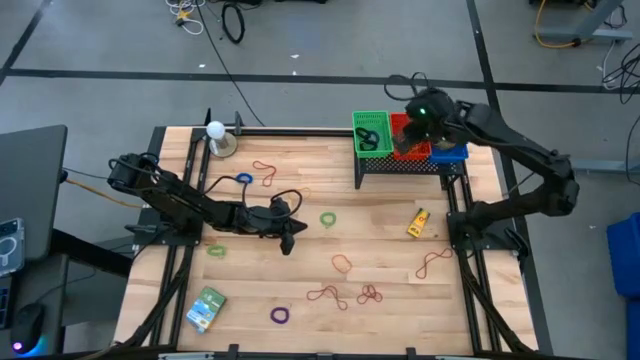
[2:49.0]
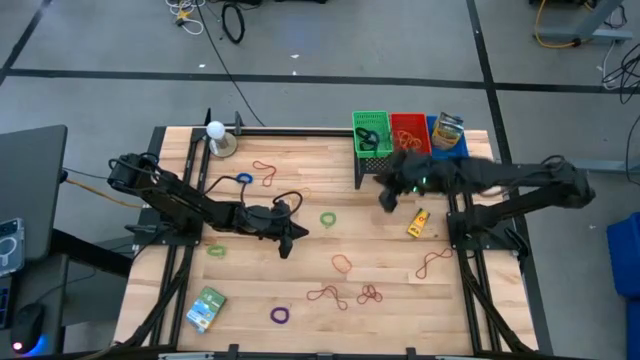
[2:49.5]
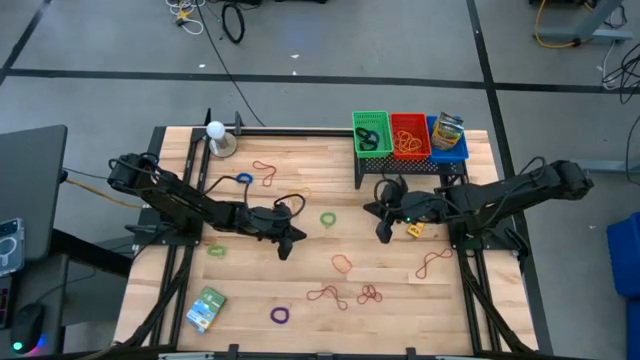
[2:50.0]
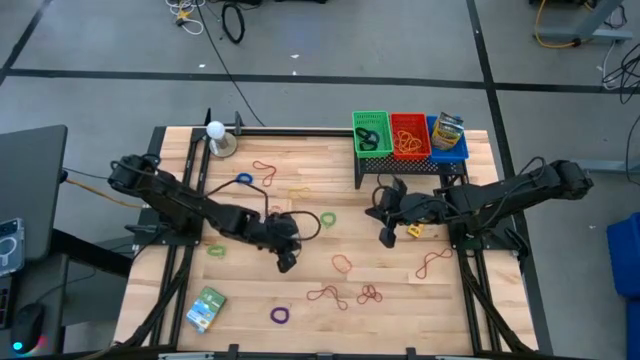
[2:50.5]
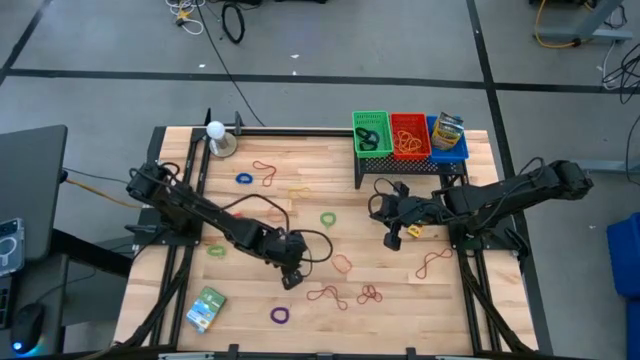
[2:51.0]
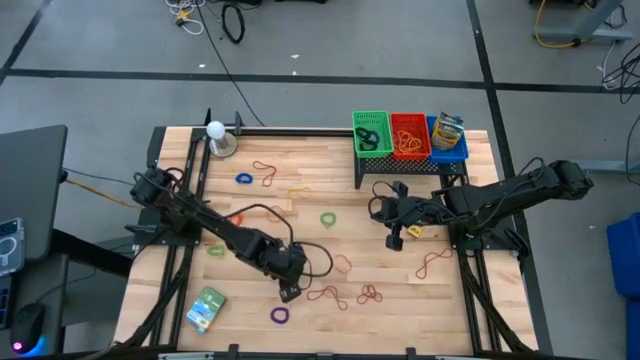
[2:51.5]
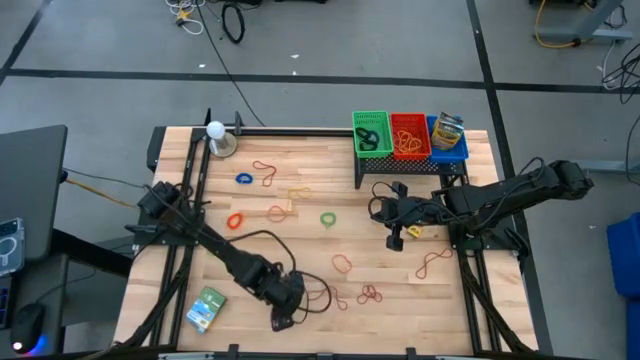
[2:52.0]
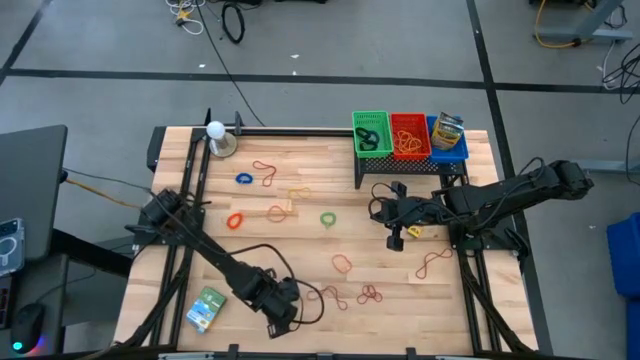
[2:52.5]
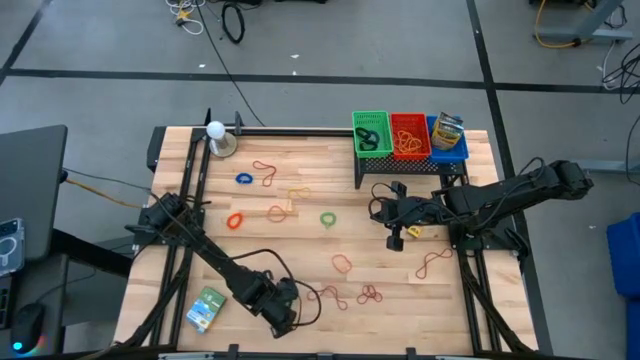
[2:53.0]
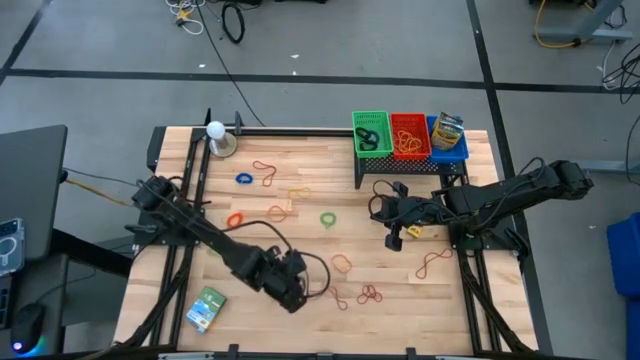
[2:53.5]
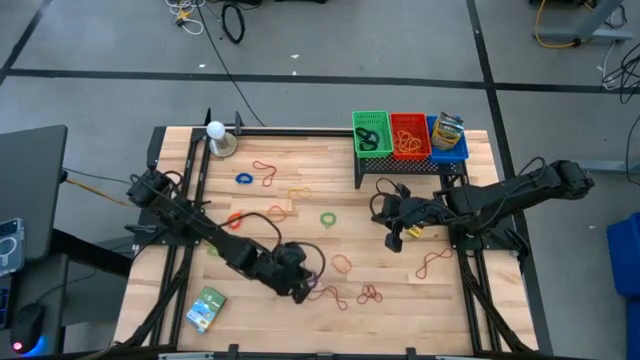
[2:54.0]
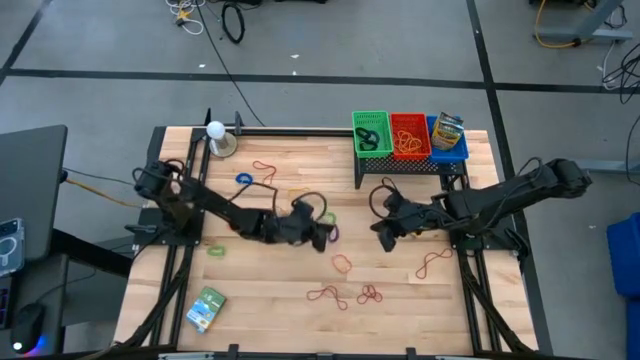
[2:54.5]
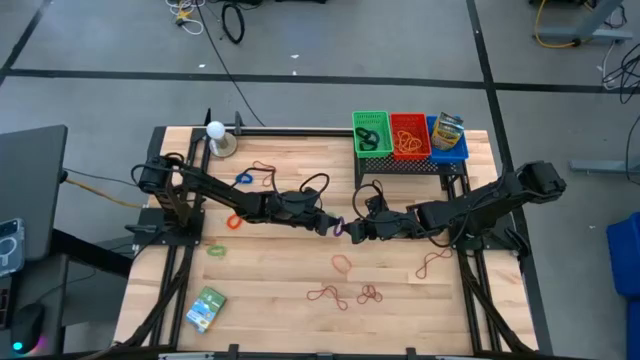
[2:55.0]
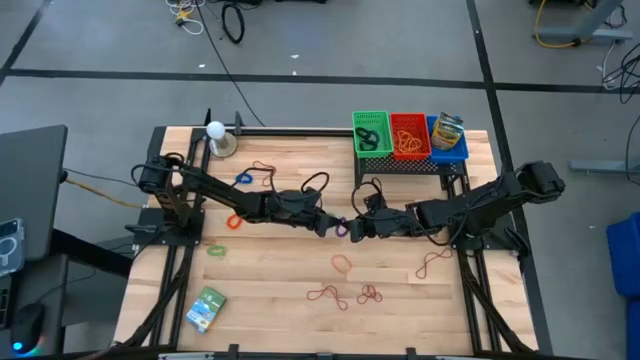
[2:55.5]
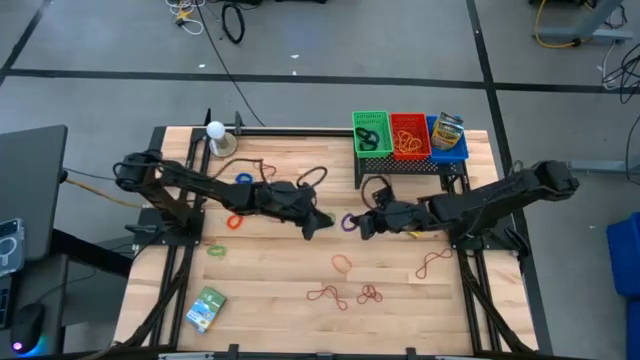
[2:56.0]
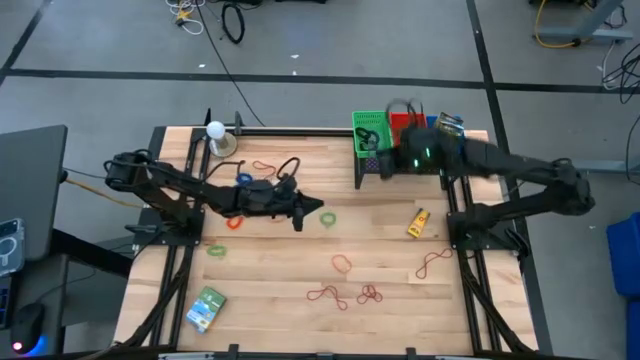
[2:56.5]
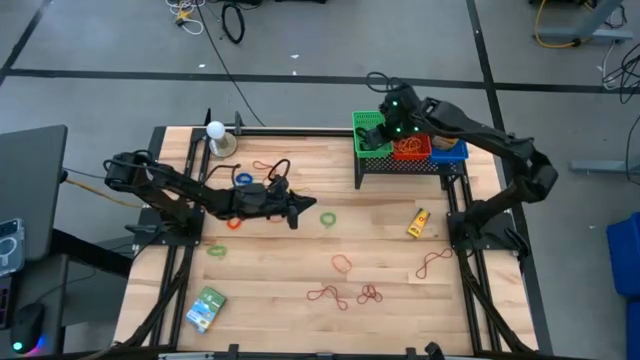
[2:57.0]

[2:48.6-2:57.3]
Task: Pick & Place Office Desk Supplies
Put the purple spring keychain into the green bin

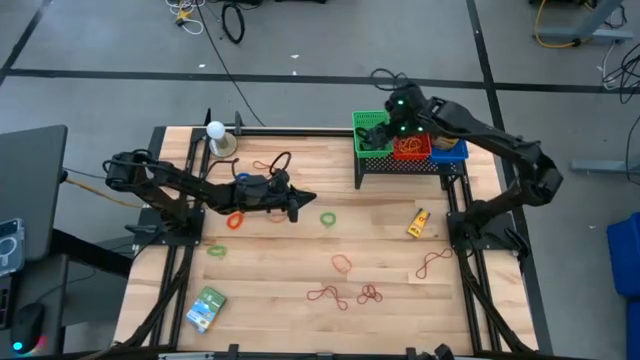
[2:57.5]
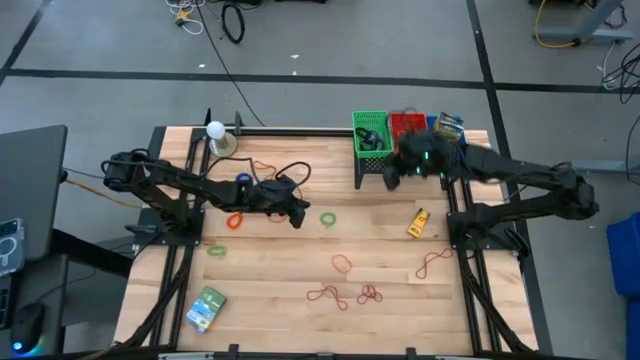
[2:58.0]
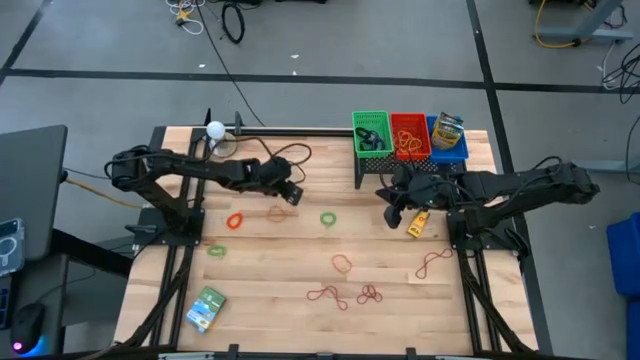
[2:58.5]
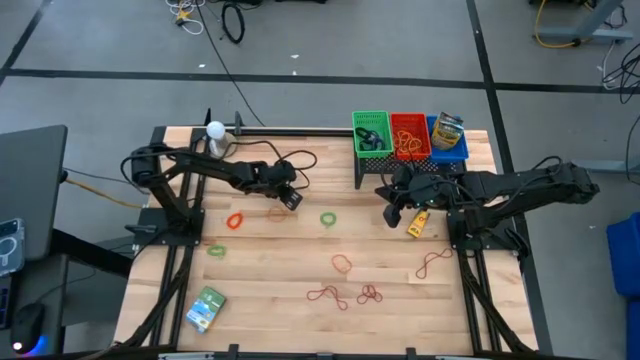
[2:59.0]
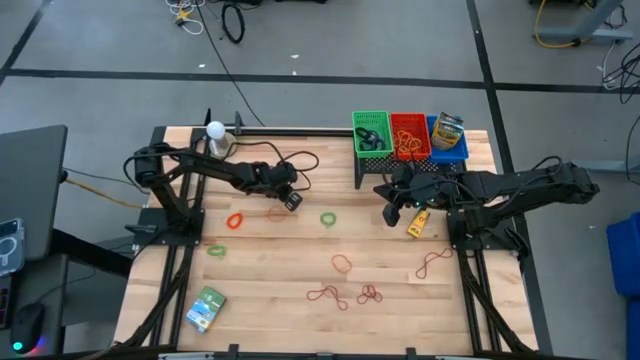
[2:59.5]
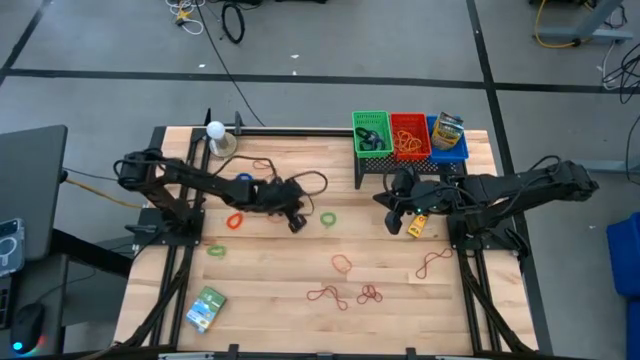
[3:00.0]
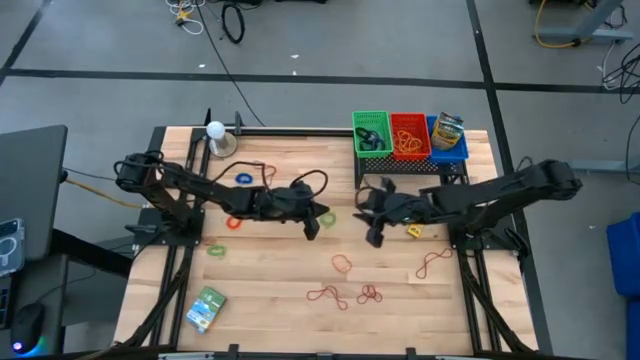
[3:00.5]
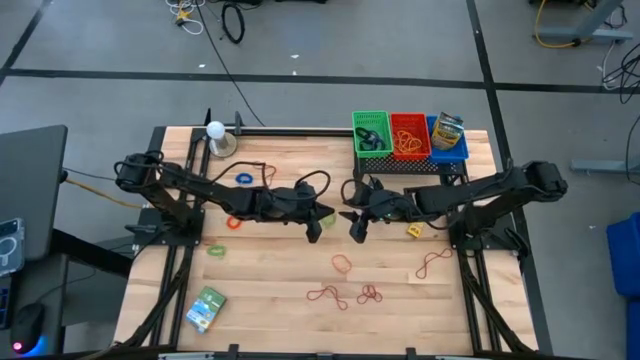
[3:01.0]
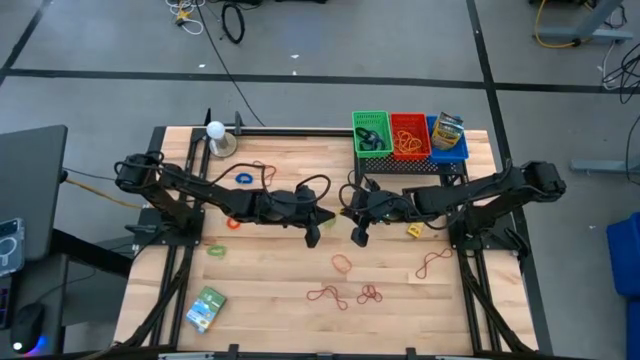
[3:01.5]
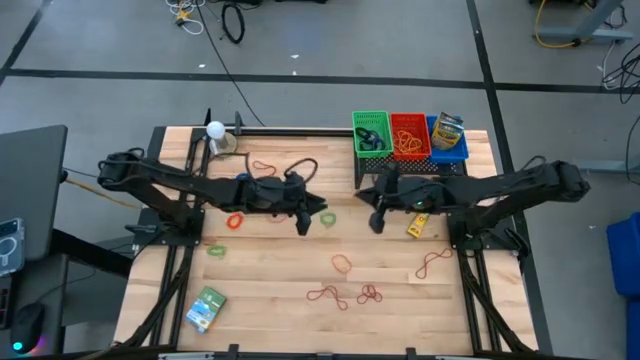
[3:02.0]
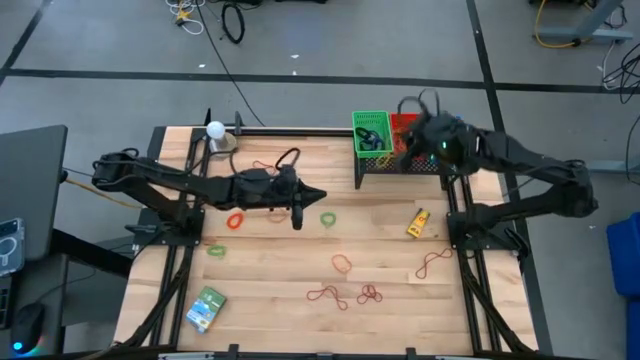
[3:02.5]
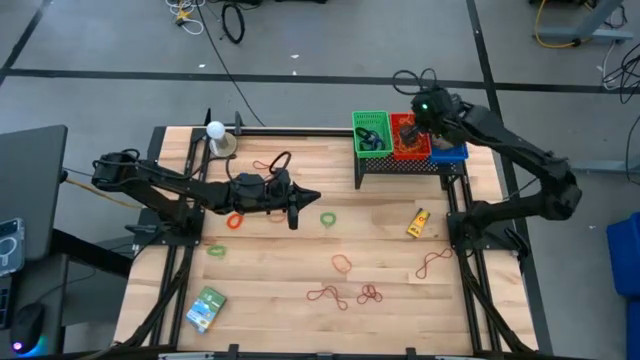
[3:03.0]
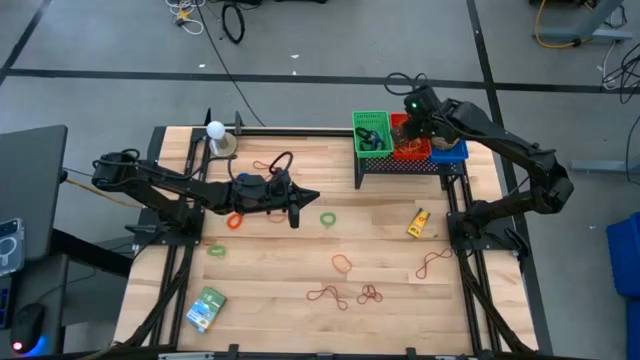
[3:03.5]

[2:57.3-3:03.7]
Put the yellow rubber band into the red bin

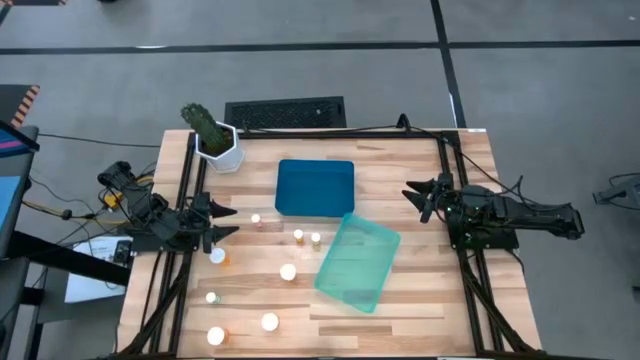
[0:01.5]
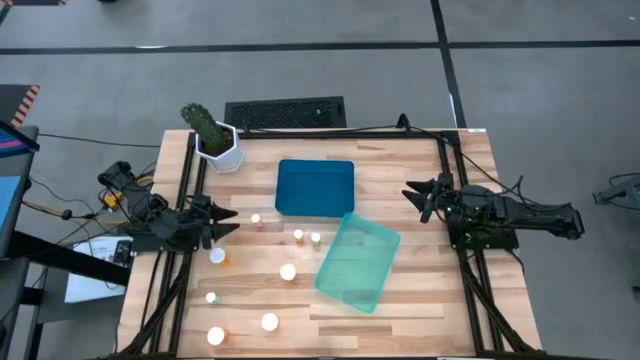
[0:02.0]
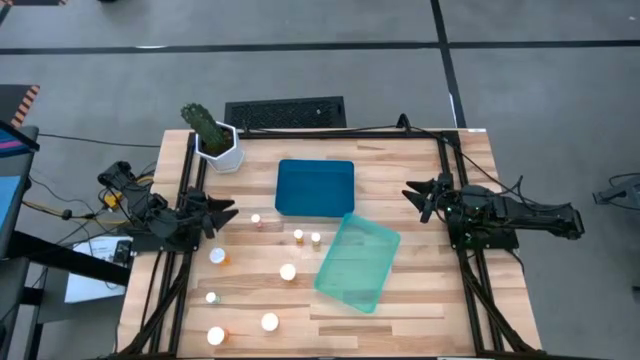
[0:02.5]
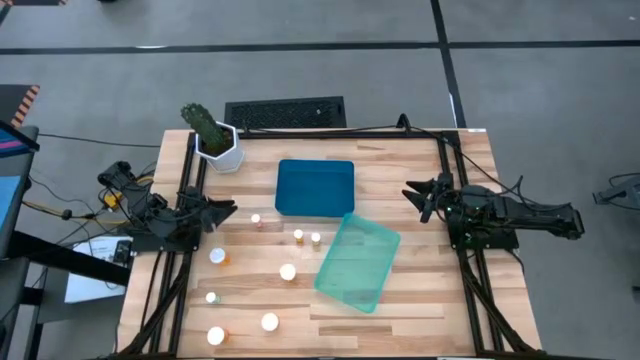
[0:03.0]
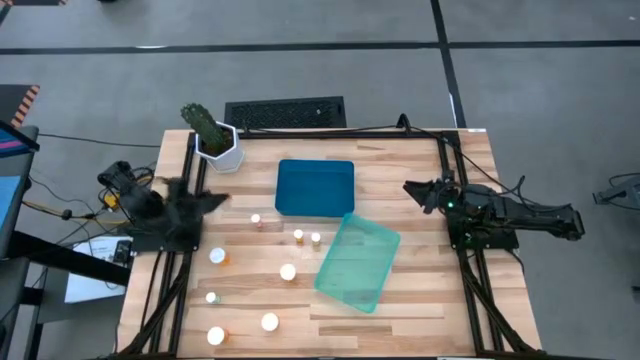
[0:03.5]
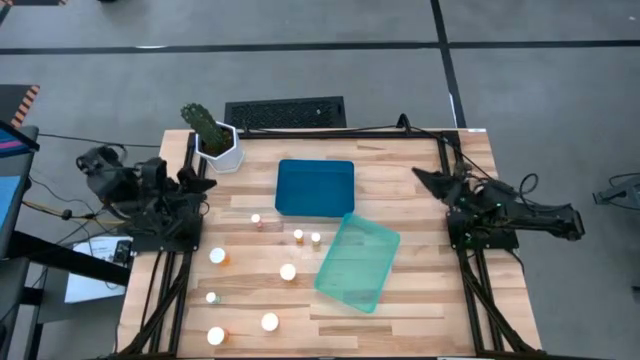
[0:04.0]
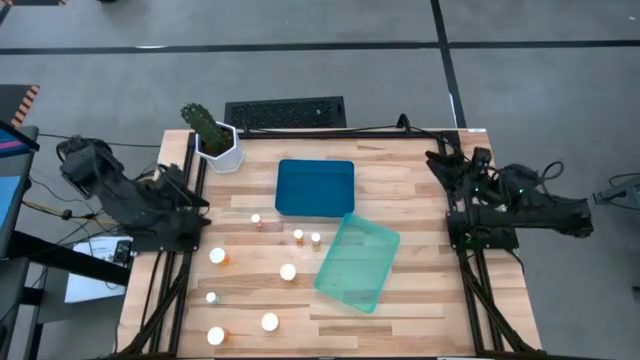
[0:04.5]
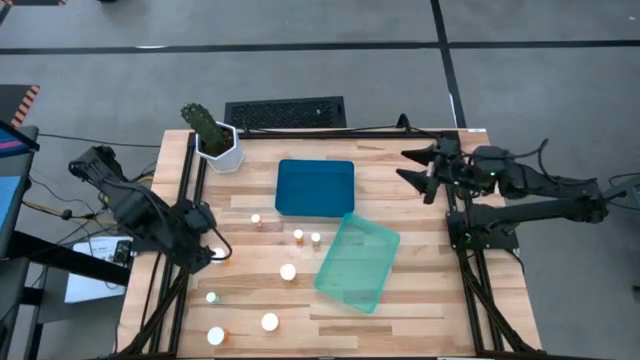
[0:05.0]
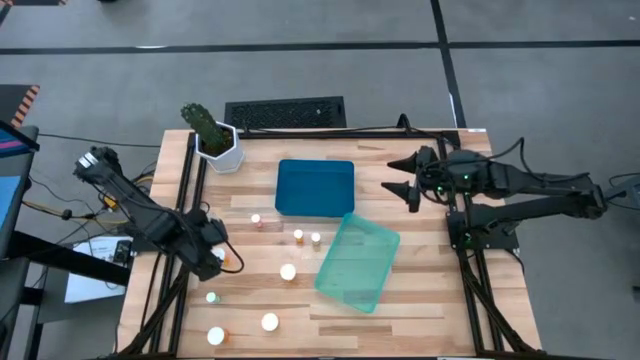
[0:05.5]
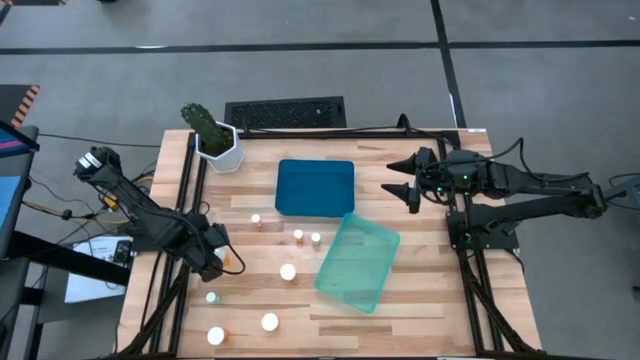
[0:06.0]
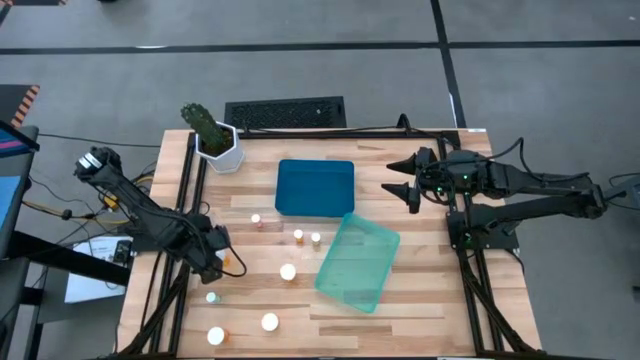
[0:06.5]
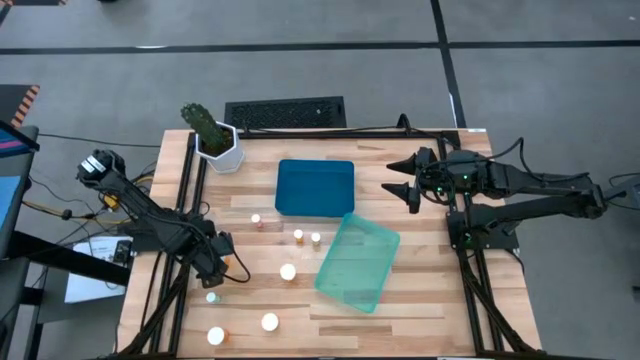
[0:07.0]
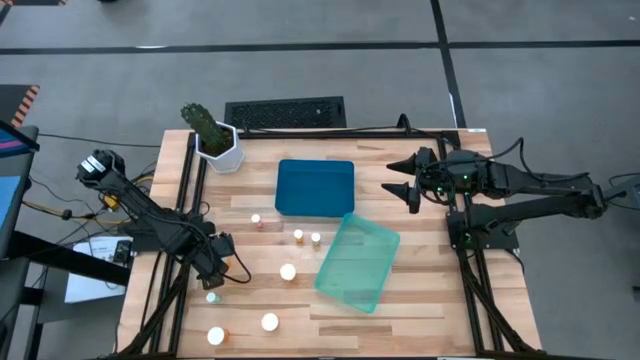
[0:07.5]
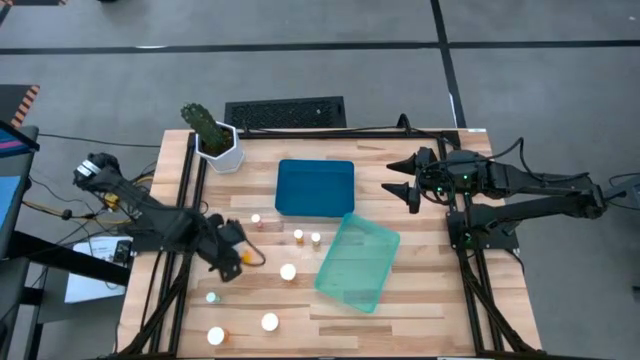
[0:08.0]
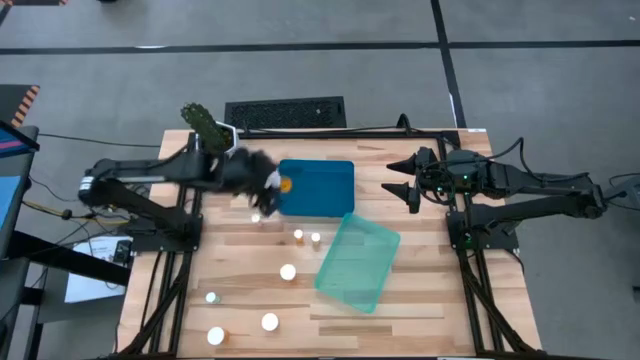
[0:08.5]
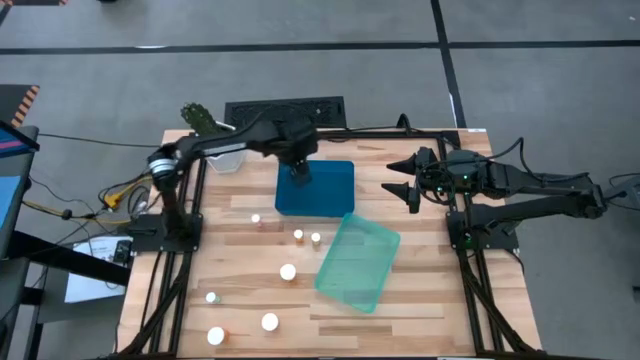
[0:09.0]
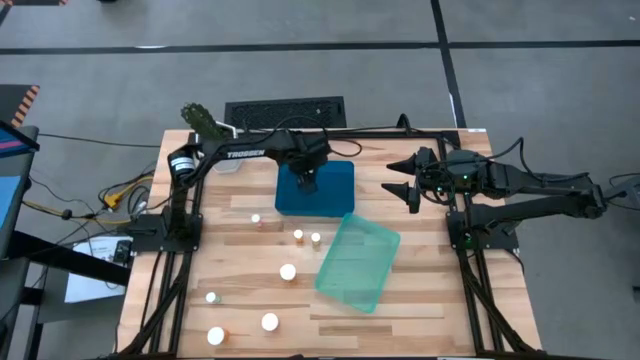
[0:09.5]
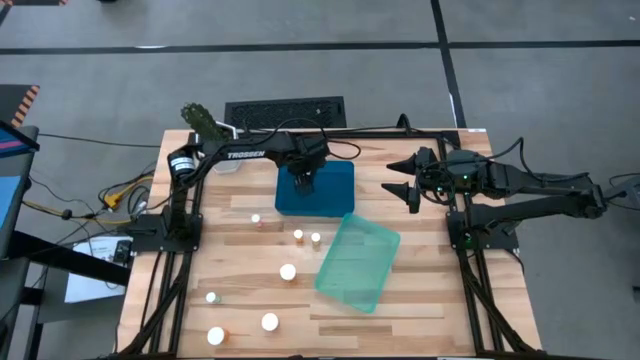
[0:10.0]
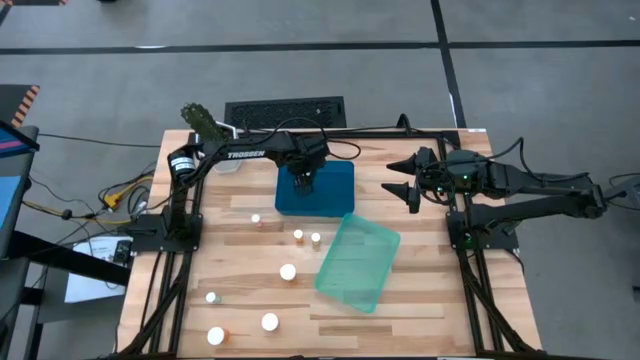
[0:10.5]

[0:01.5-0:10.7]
Task: Pick and place medicine bottles into bin by pill shape (circle, oval)
Put the large orange pill bottle into the blue bin
